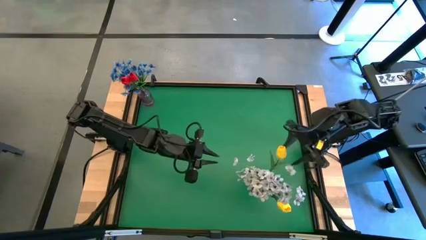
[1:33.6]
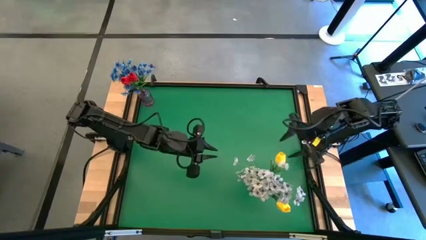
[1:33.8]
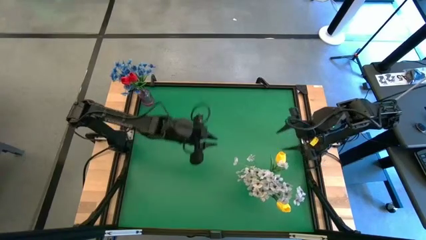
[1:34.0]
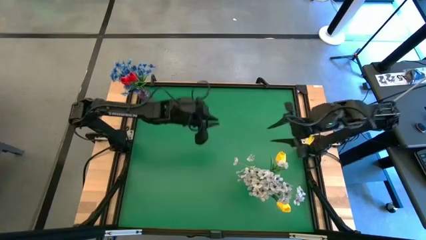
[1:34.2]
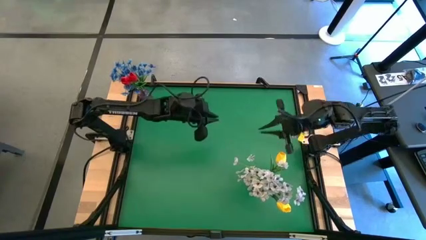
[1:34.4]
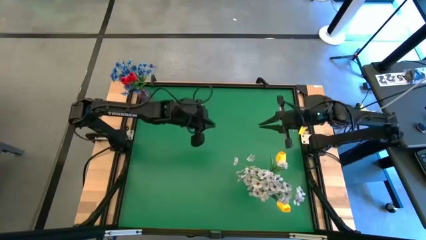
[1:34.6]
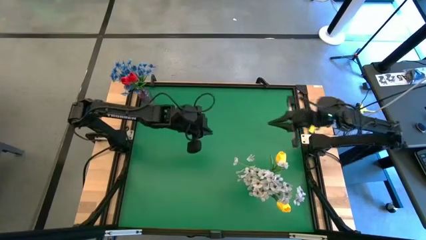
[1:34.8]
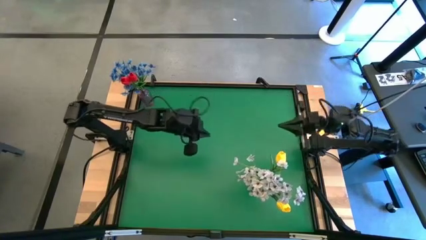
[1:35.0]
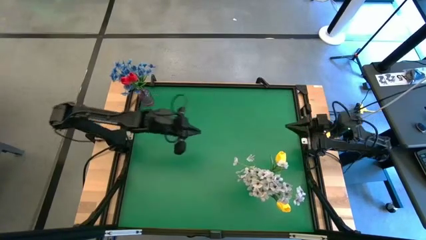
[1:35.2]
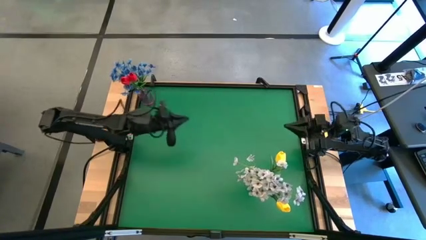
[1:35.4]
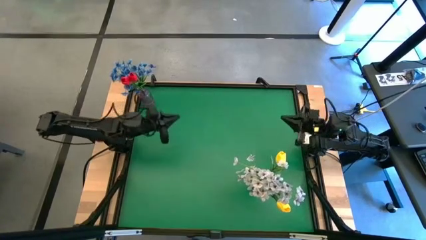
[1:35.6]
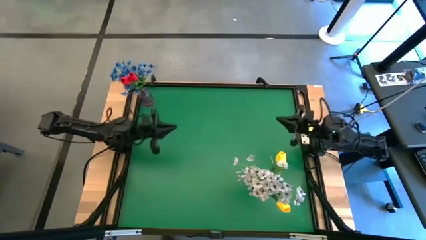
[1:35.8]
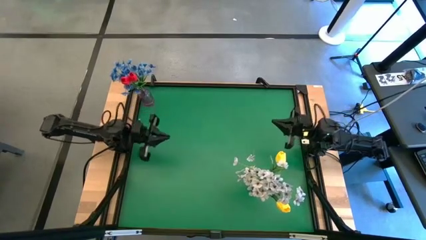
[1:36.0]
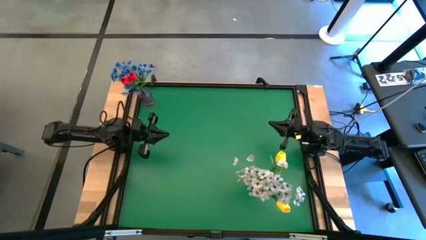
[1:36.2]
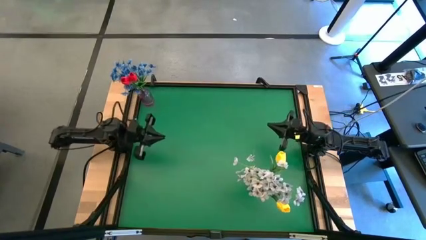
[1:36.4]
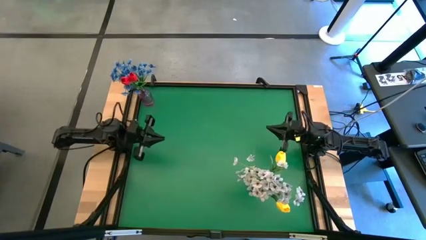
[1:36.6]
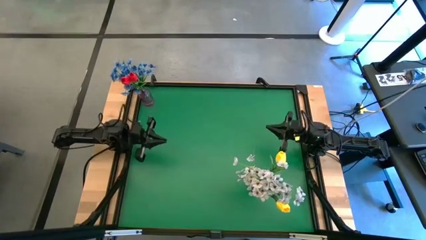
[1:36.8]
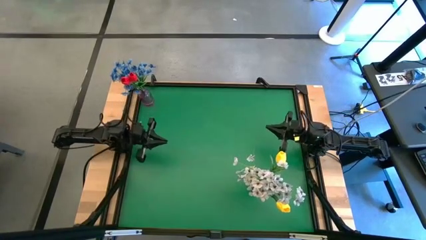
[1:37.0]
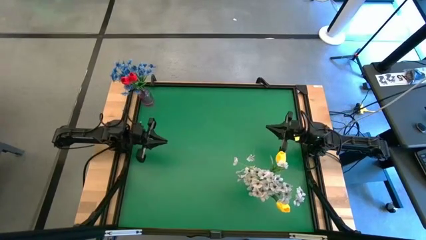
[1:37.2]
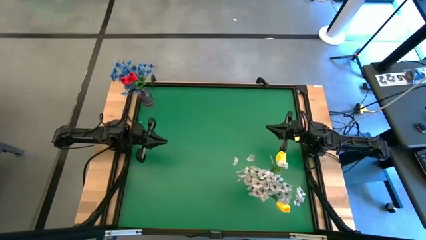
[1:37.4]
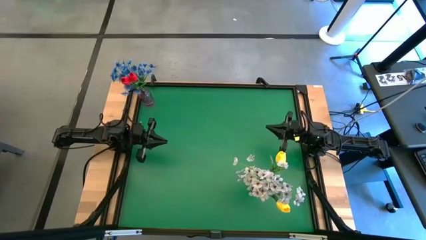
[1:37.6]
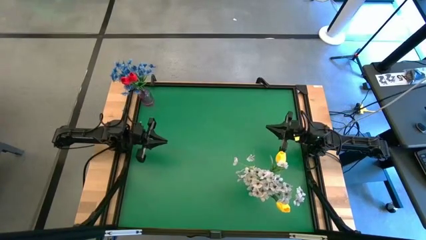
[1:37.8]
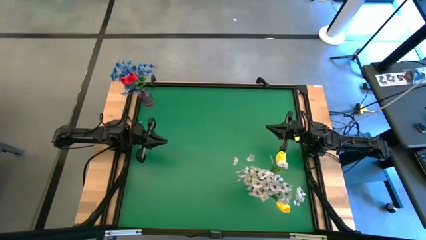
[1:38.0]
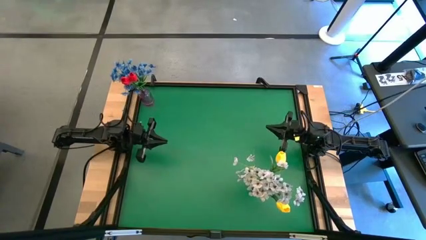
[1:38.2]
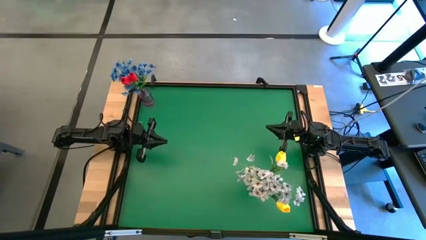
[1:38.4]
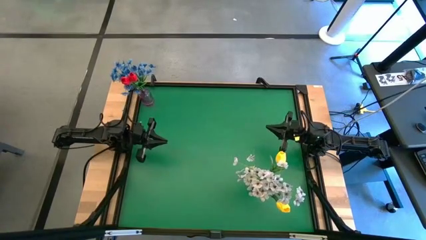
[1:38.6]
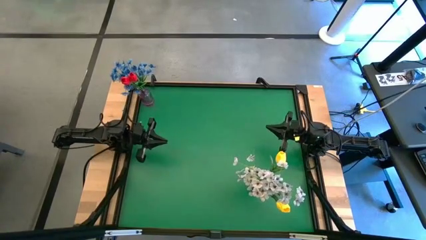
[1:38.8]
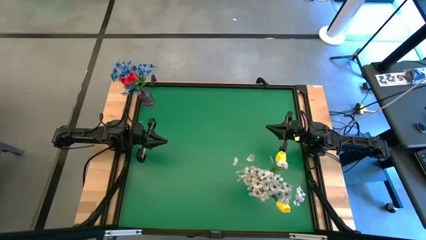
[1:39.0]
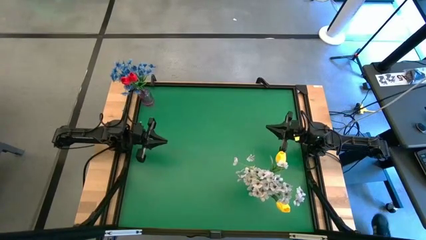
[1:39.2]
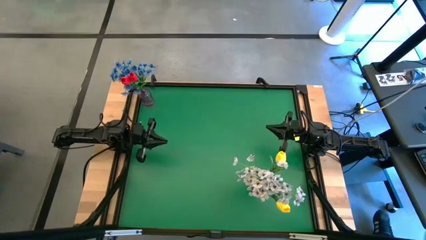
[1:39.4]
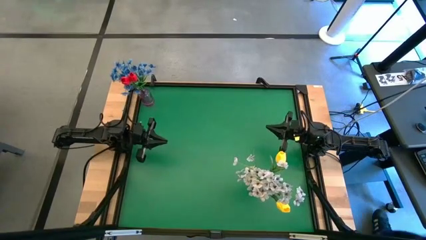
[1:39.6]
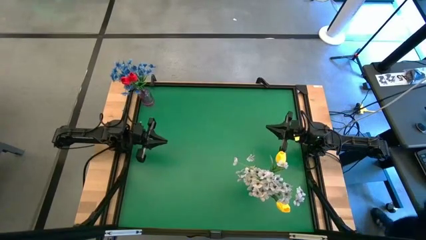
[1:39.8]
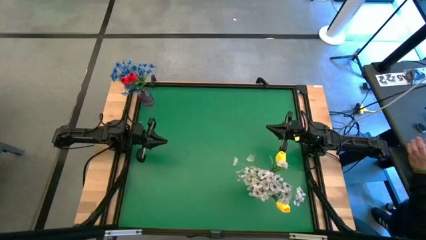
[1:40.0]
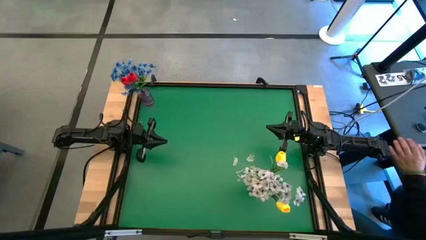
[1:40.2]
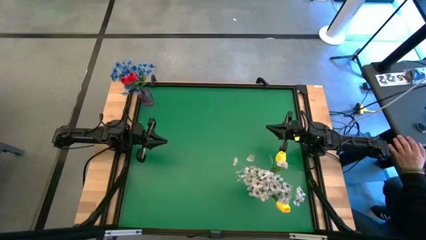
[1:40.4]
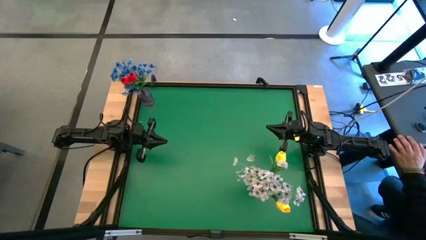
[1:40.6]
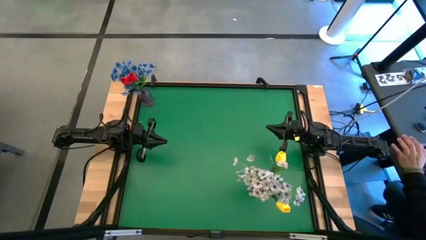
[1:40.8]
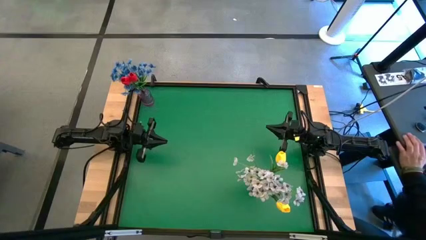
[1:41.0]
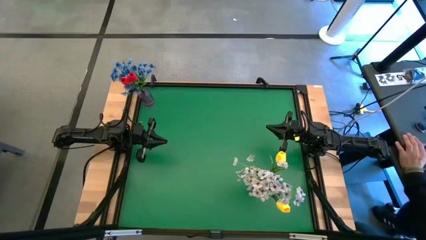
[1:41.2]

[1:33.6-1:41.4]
Task: Sort flowers into vase by color
Return to Home Position

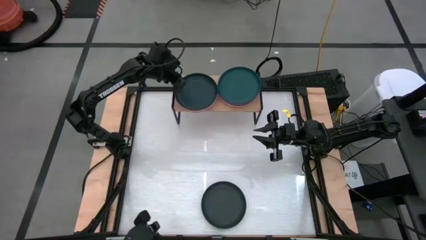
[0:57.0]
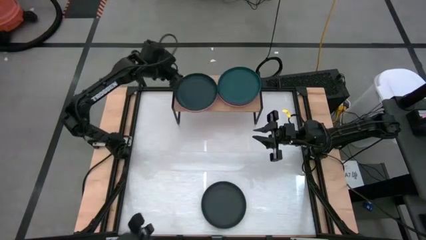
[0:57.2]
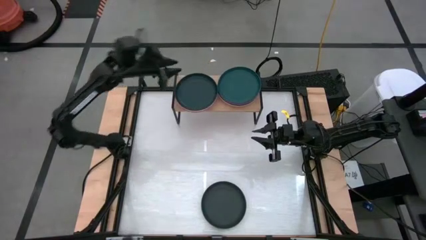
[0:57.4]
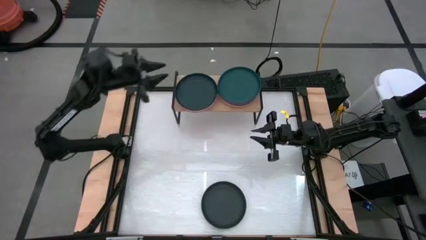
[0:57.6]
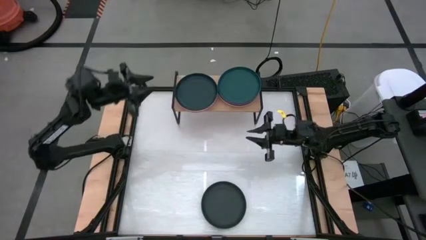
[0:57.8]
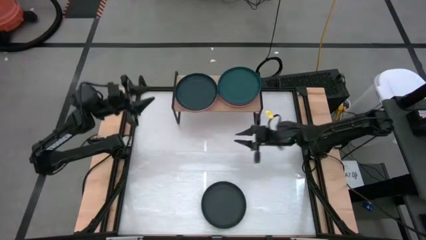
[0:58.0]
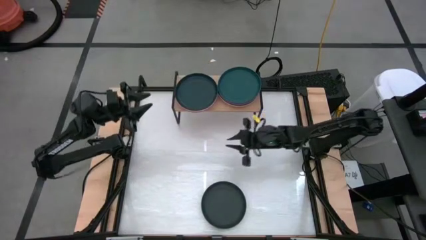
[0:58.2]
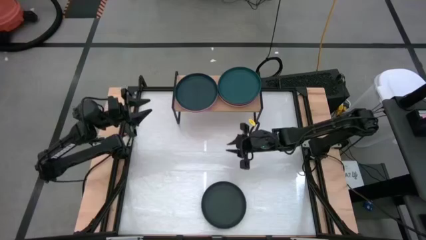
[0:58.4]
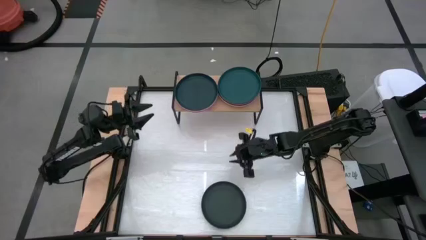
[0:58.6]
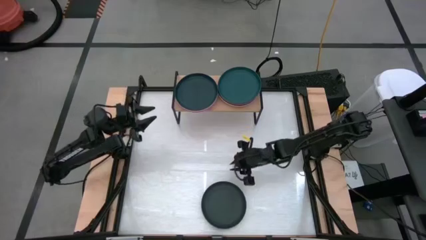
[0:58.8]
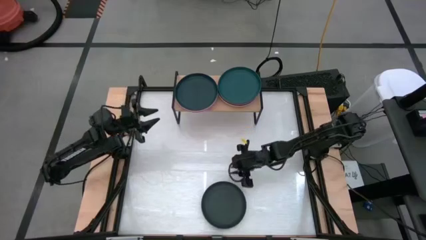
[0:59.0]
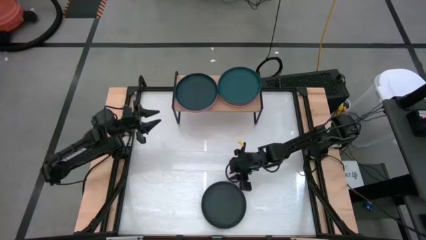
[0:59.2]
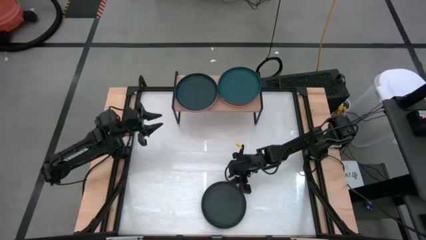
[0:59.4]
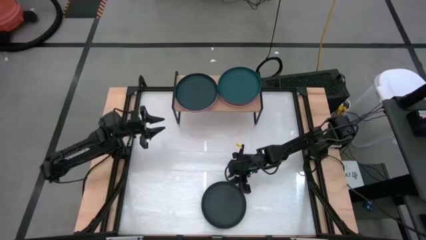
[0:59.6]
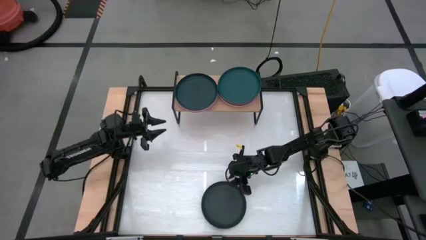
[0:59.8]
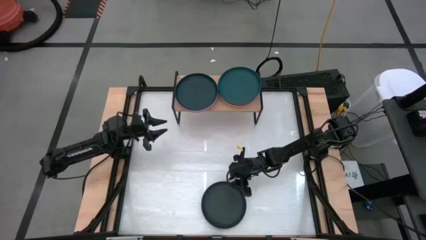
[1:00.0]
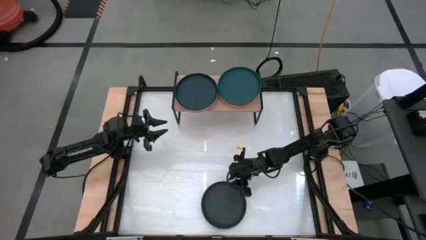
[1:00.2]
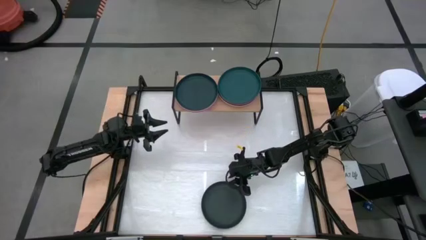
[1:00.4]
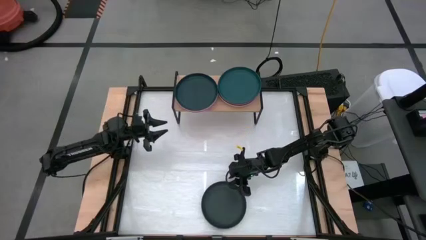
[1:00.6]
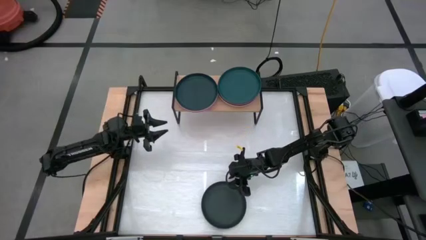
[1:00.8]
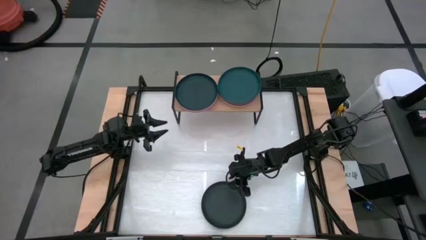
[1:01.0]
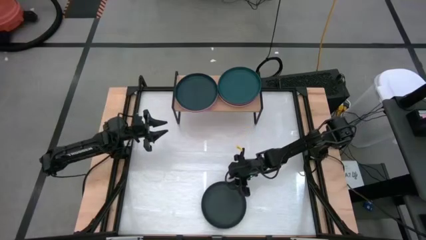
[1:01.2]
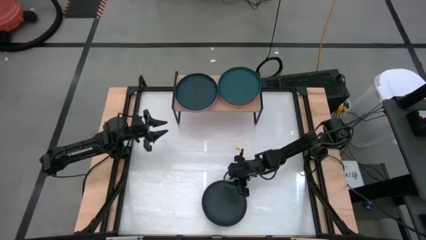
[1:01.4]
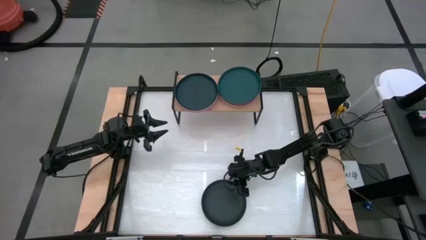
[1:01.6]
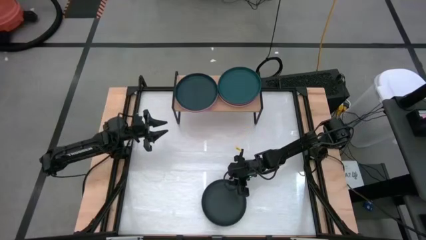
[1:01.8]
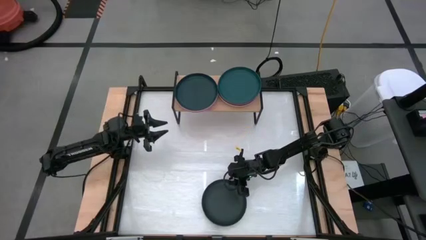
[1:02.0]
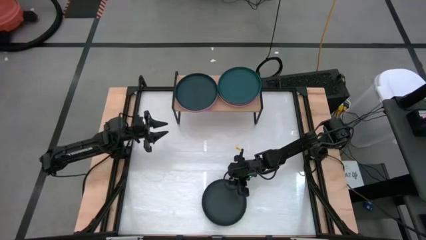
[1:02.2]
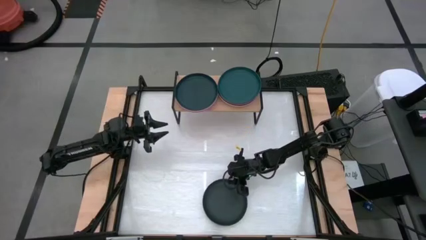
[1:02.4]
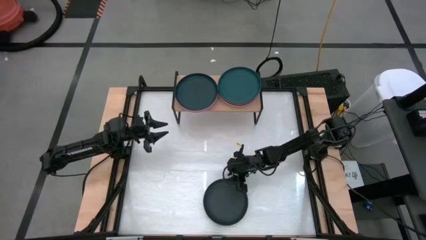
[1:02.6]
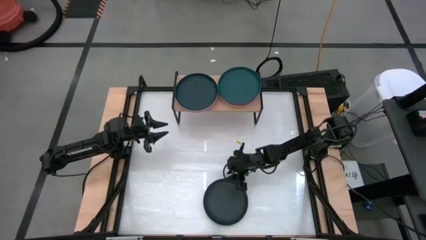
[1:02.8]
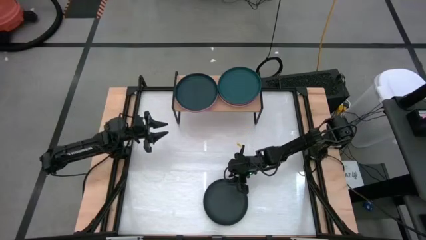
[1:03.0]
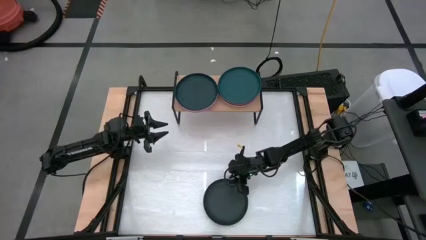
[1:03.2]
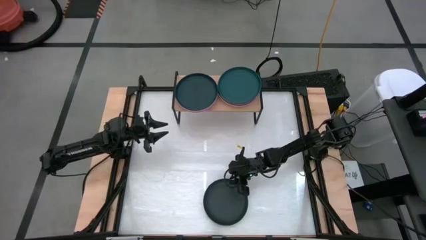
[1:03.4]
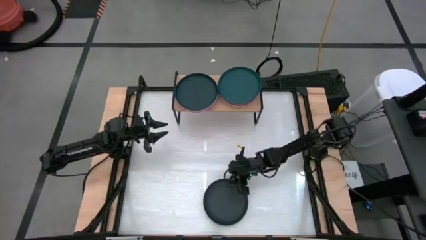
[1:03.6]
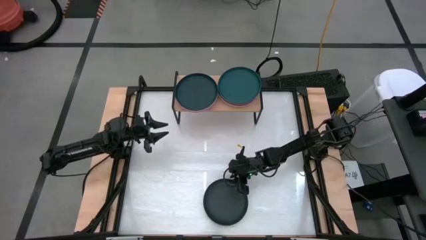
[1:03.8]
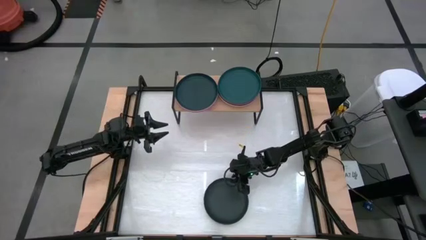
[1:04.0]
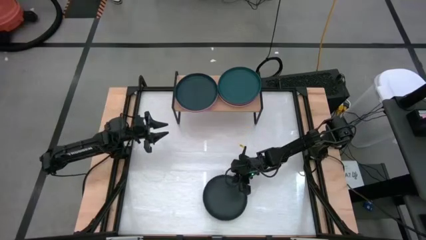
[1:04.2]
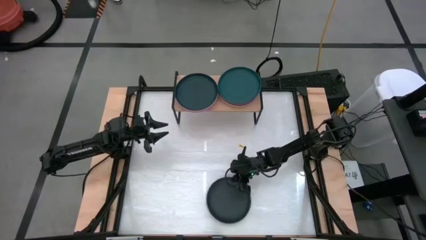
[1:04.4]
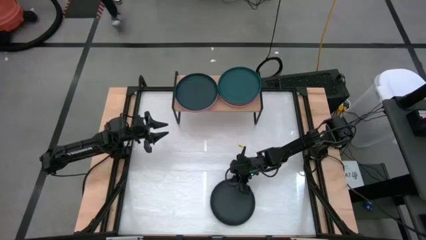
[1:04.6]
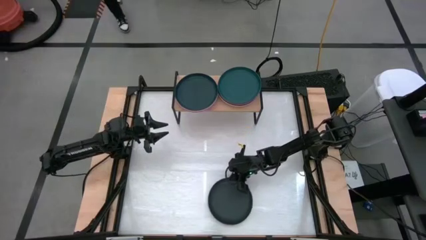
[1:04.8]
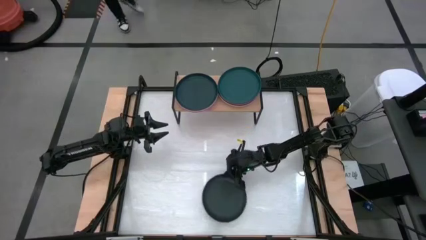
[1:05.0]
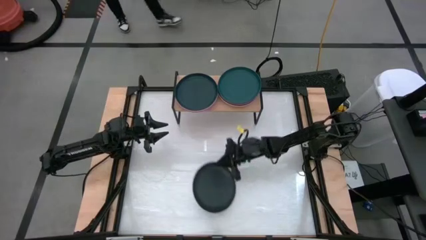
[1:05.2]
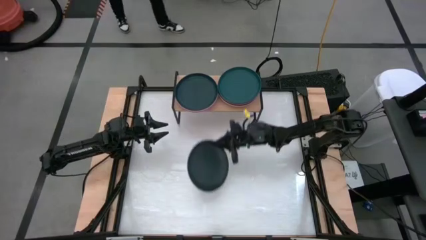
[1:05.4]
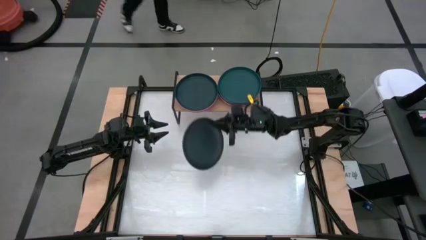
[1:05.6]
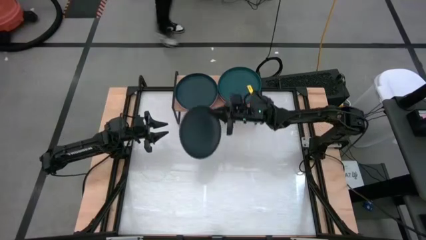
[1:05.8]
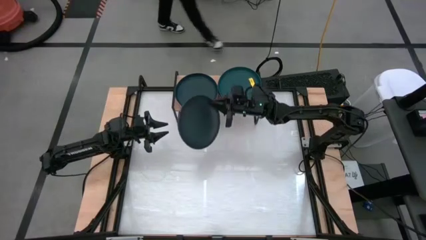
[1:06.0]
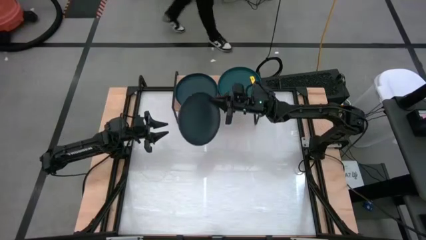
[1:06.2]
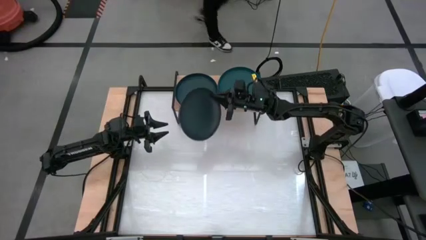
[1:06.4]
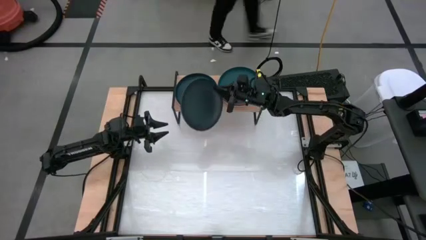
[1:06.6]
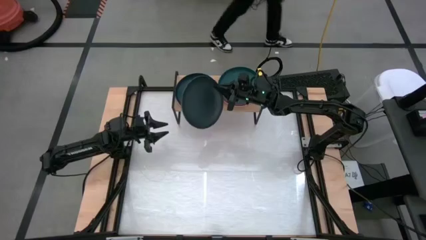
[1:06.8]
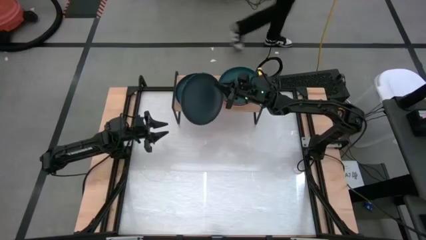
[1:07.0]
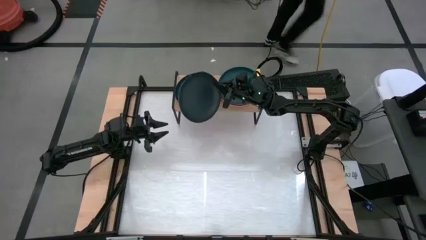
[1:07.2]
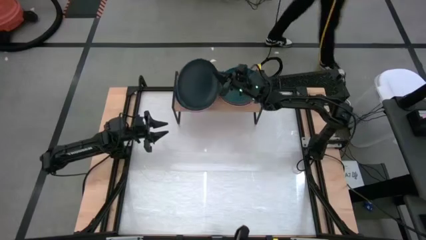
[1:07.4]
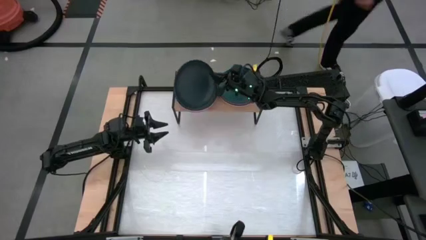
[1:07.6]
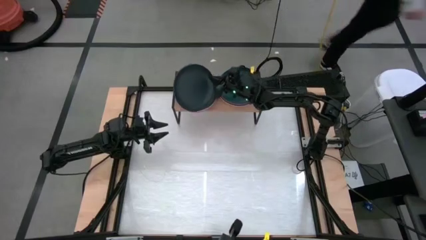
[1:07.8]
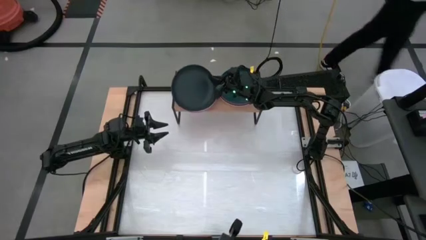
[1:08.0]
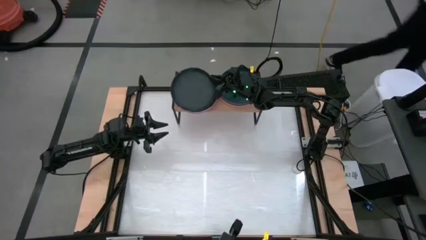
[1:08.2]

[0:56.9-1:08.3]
Task: Place and stack plates onto a shelf
Stack the black plate on top of the dark blue plate on the shelf
